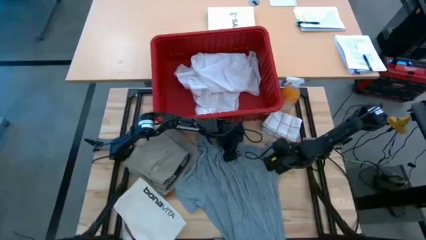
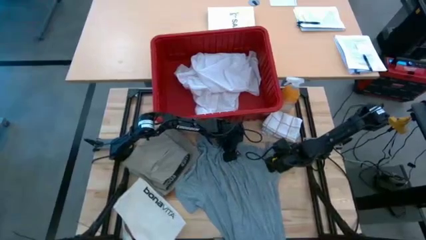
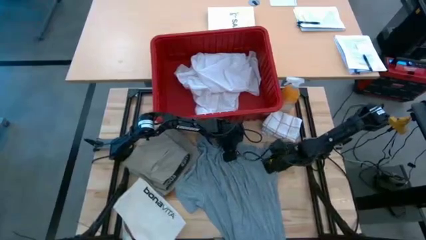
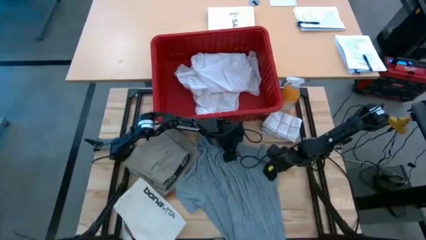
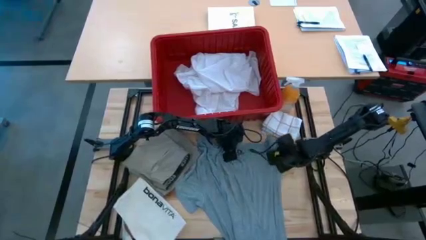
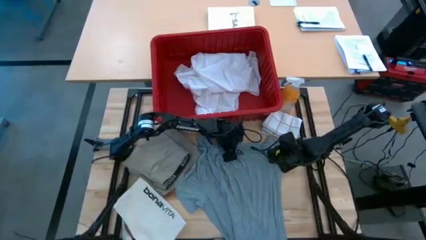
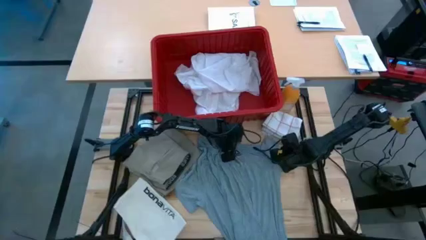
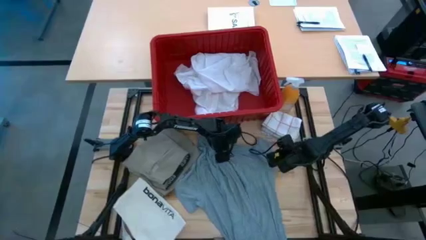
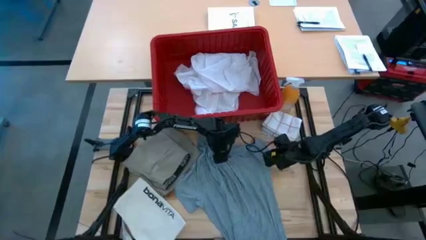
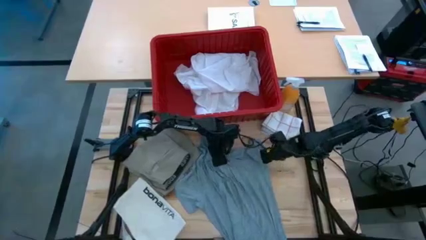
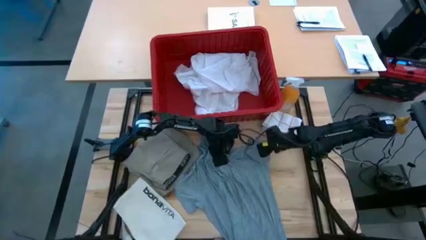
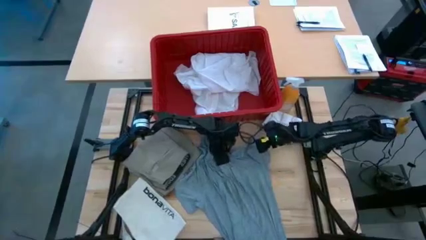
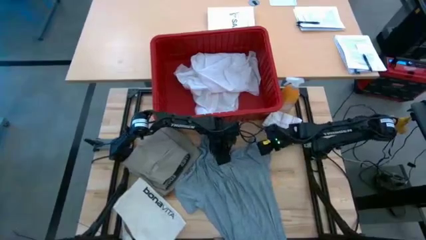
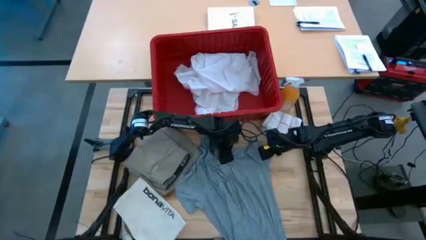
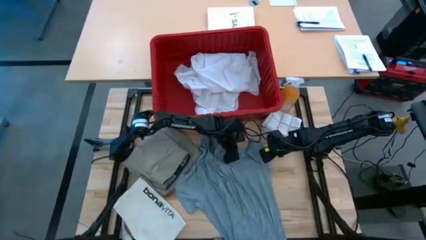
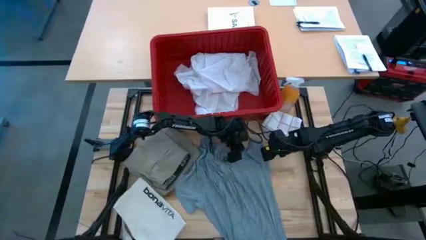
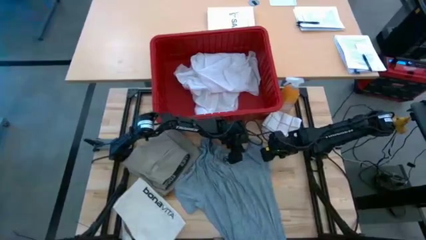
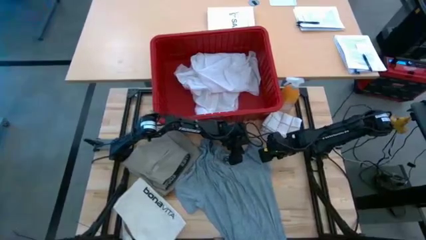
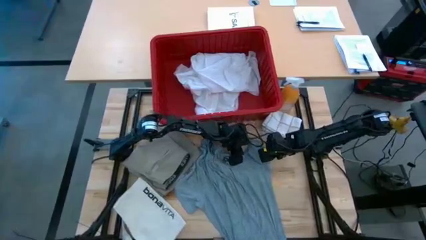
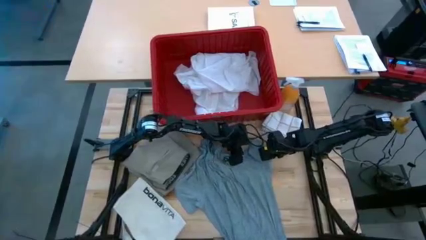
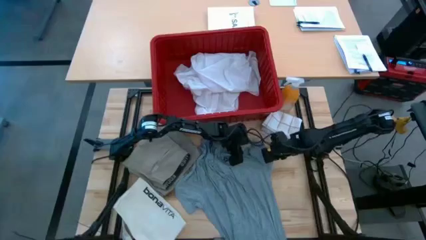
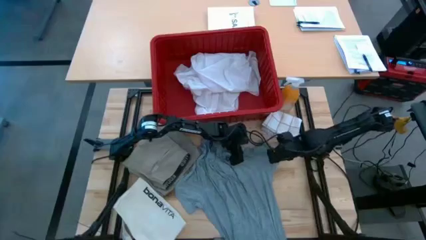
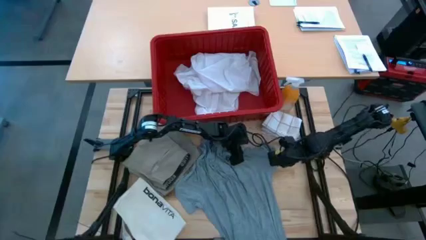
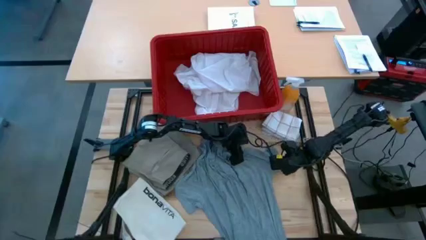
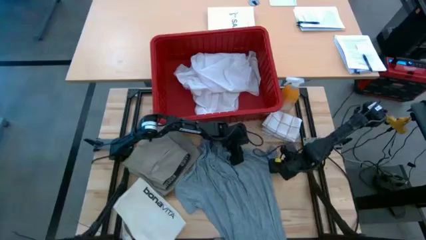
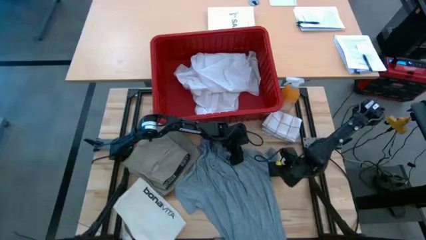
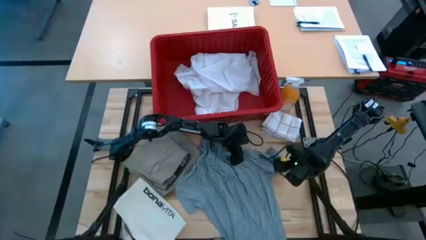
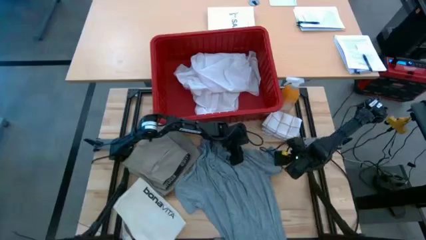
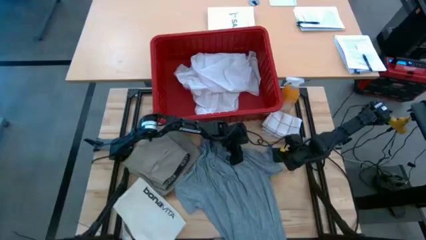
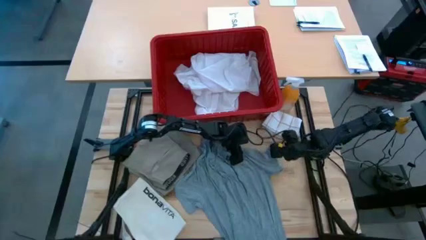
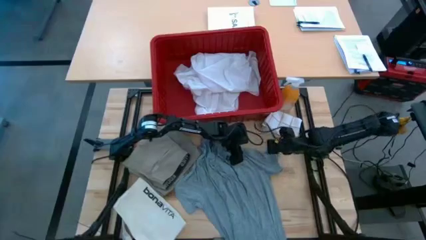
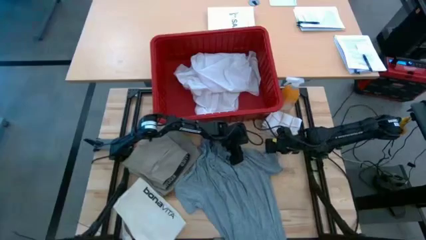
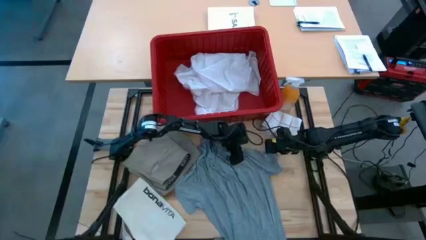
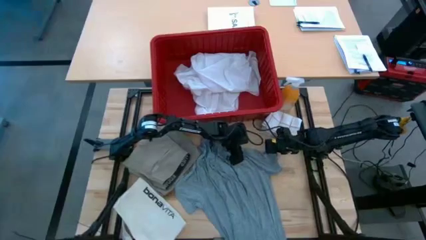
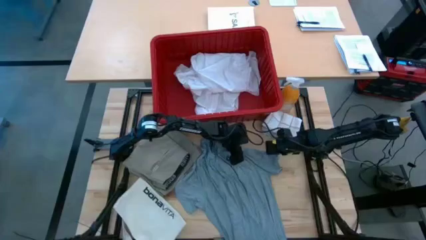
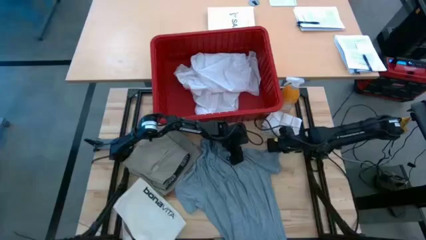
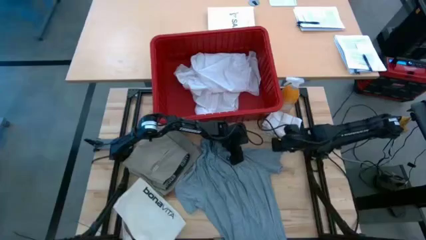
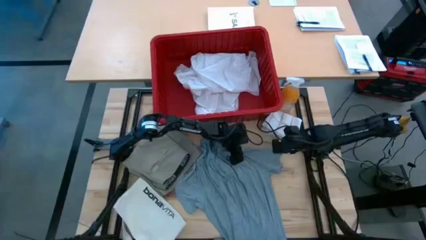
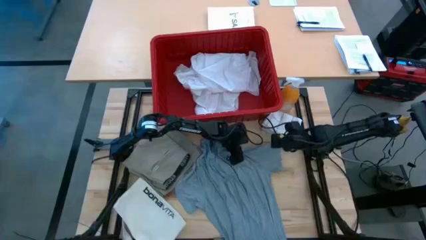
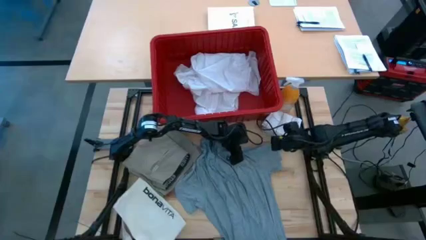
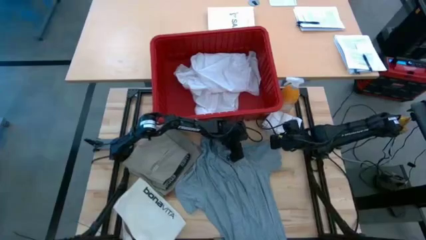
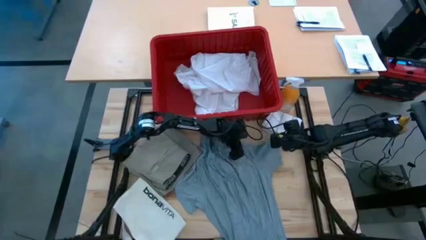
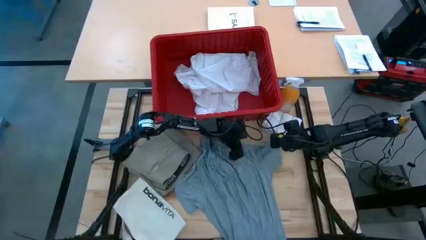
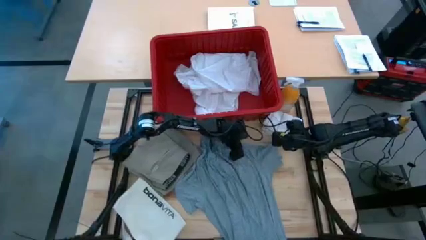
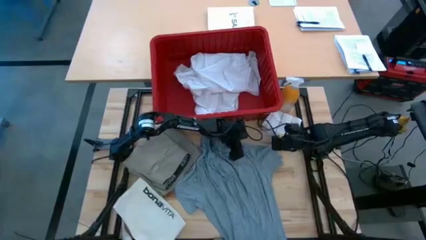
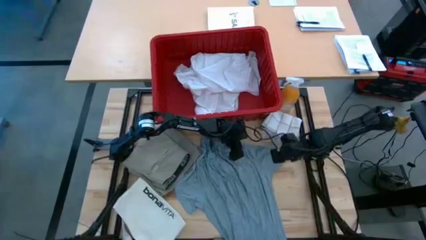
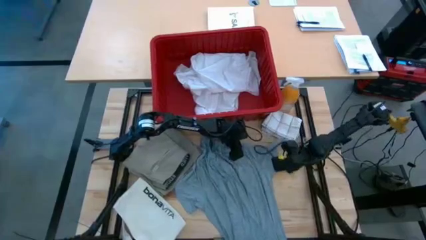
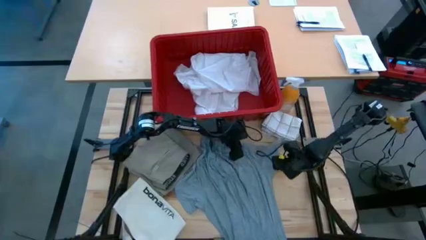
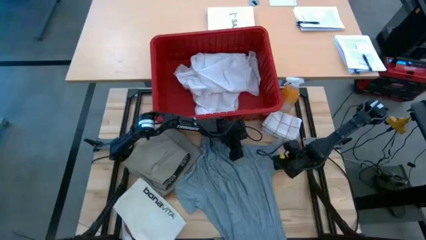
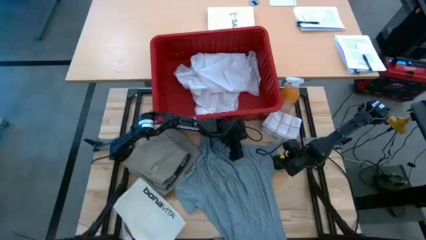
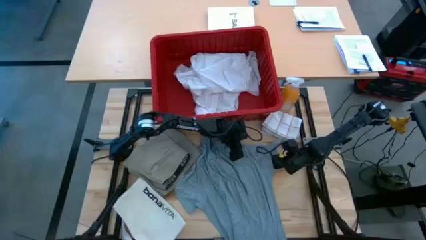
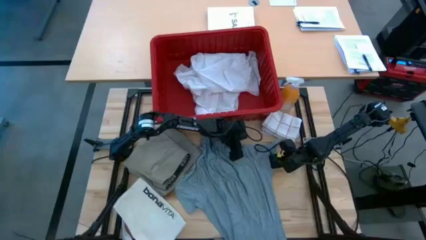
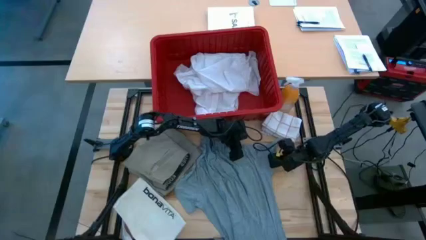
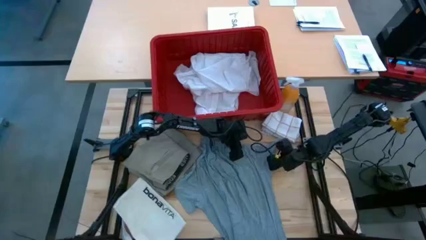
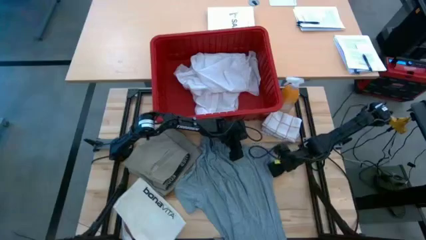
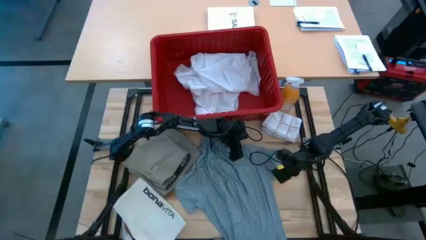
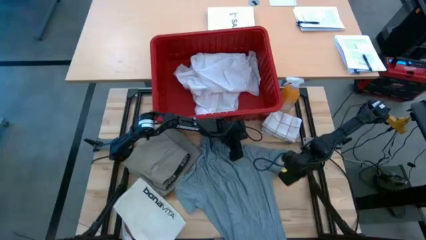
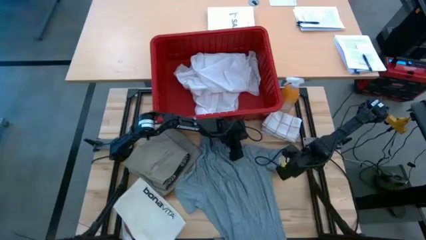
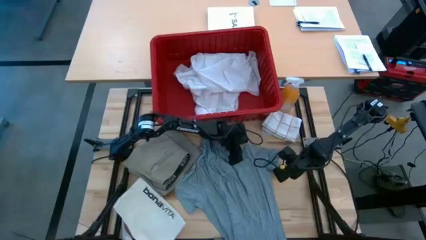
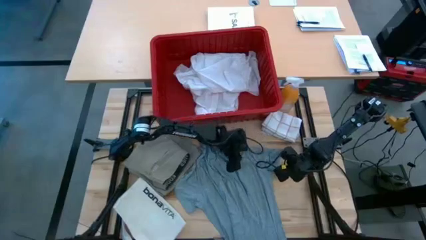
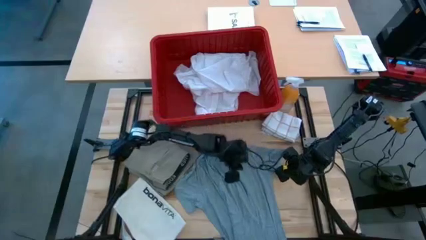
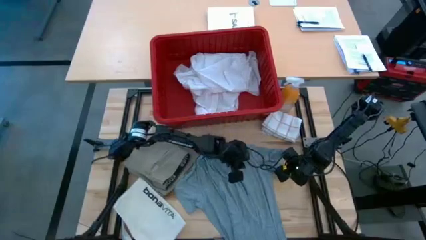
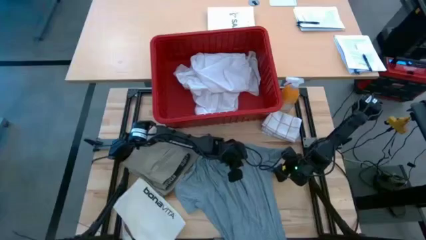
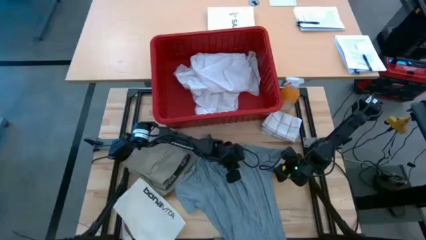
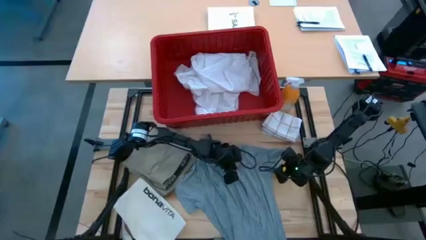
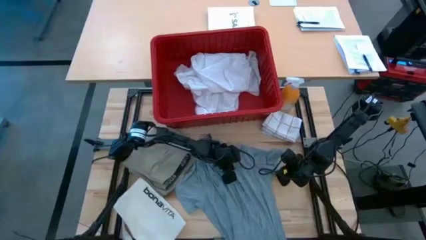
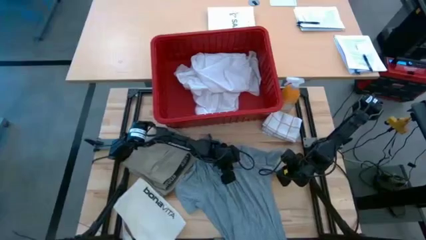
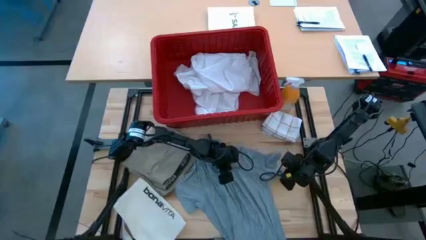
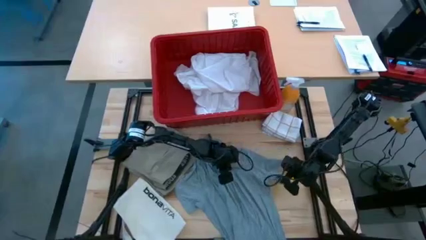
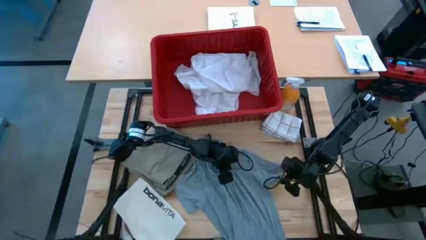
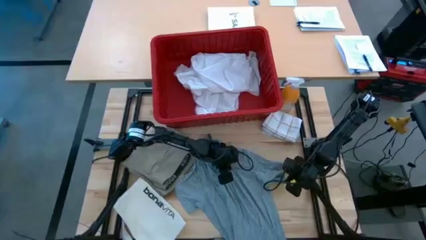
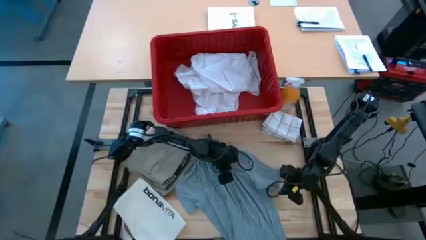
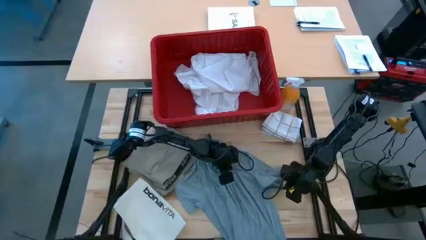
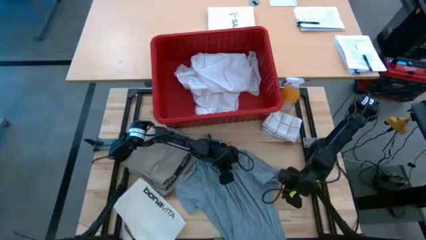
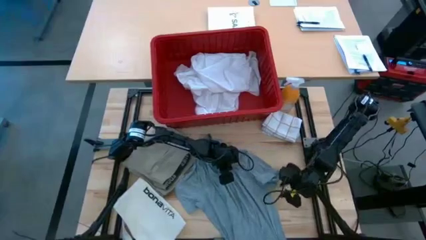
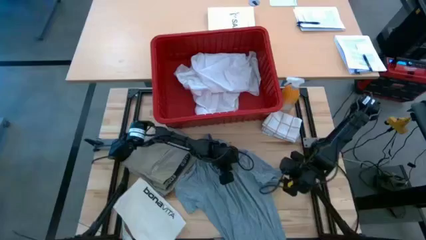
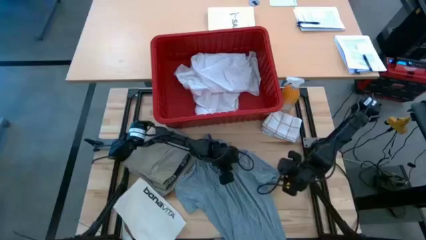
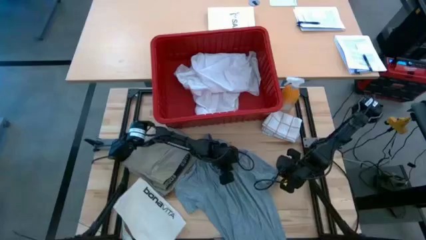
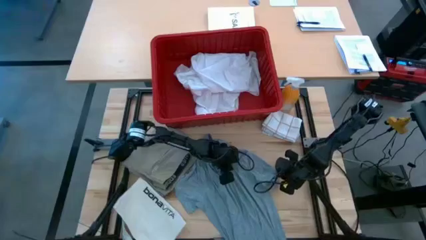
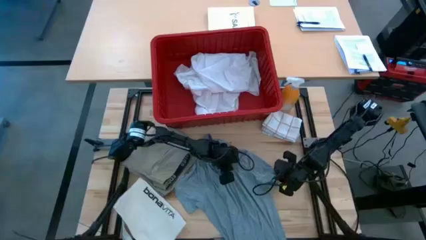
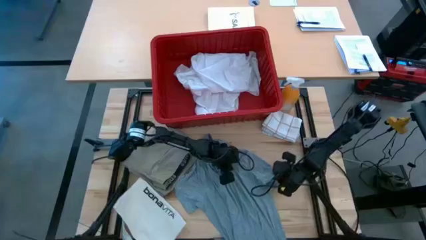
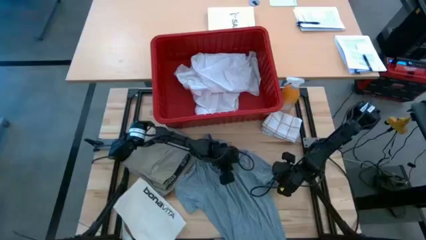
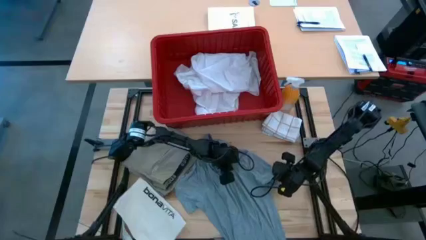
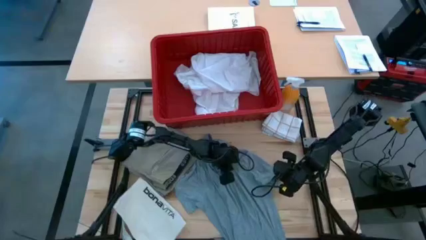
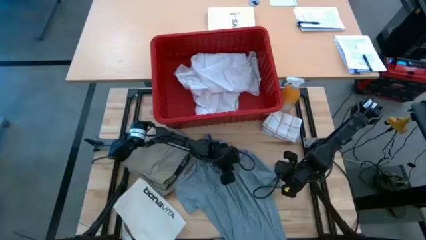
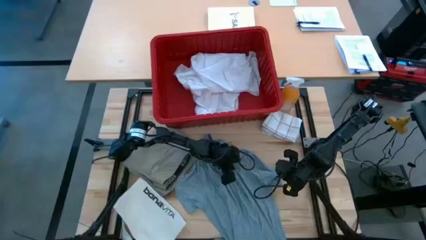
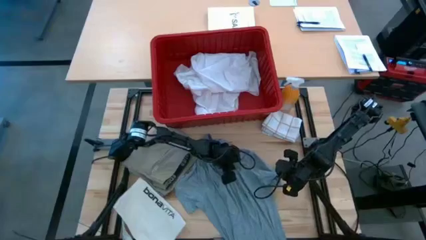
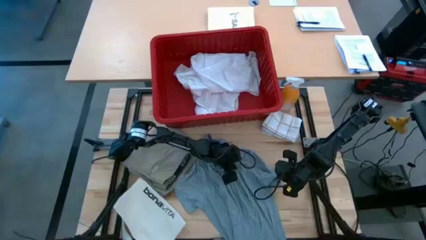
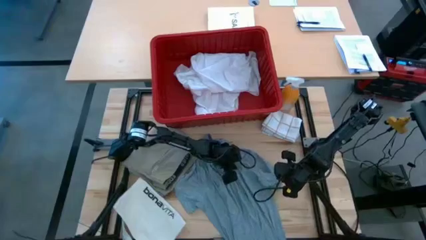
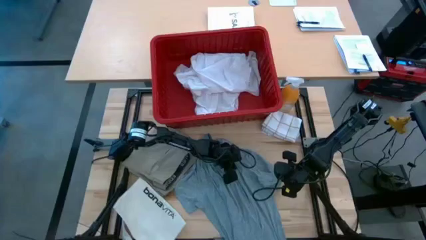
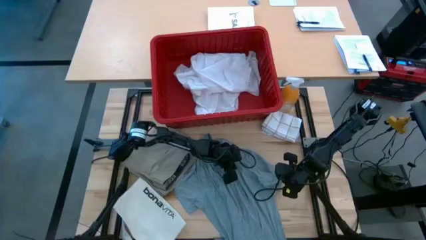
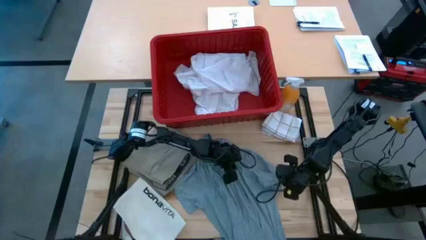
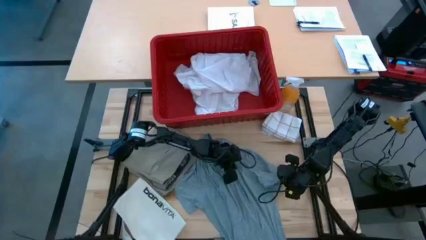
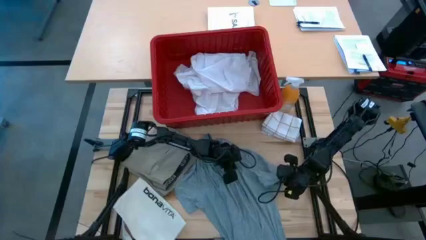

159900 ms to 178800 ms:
Task: Fold laundry
Fold the gray shirt
